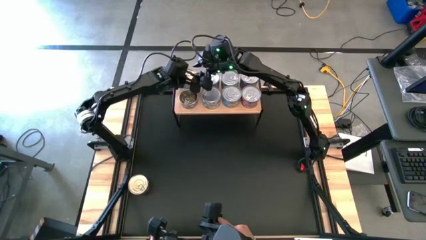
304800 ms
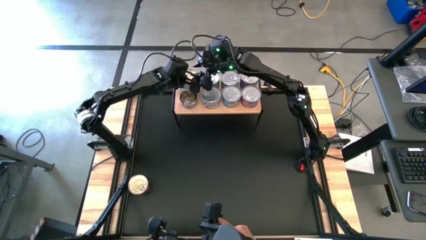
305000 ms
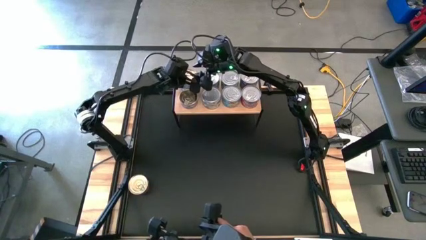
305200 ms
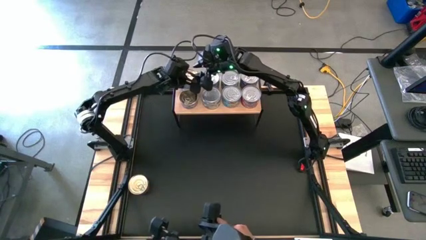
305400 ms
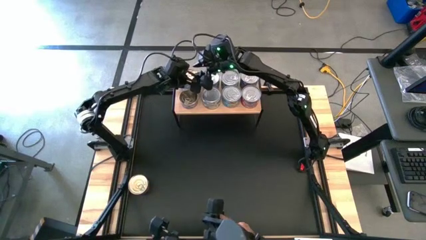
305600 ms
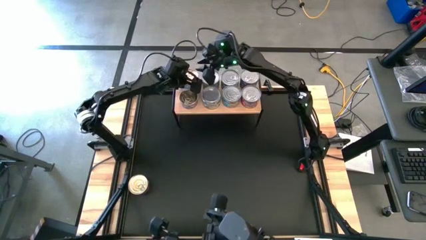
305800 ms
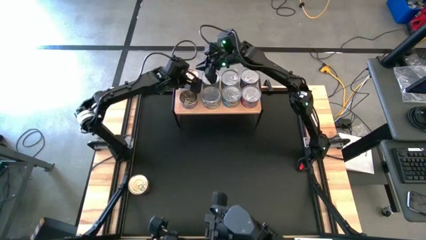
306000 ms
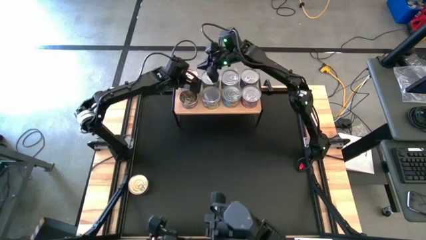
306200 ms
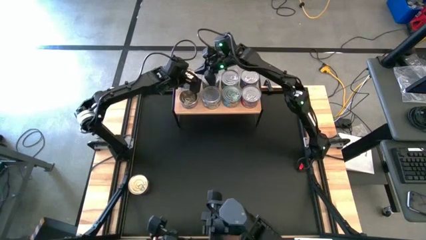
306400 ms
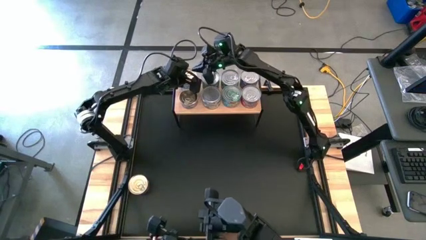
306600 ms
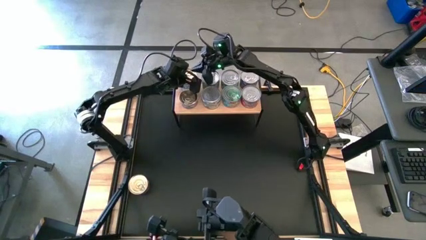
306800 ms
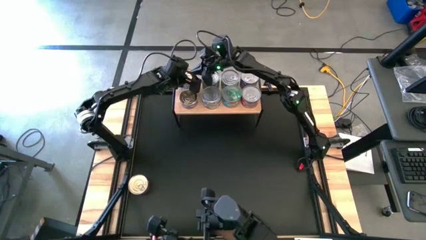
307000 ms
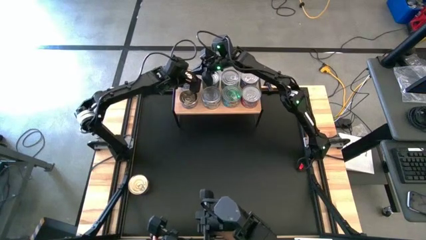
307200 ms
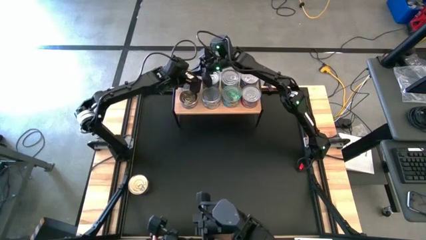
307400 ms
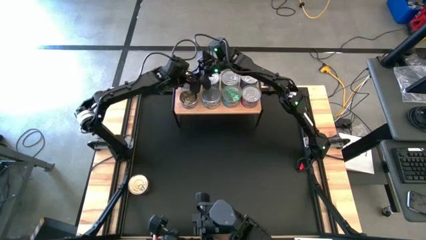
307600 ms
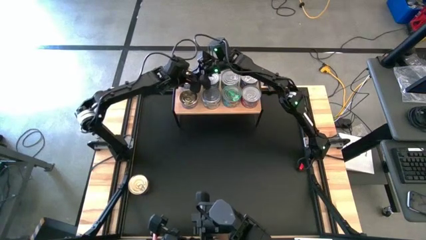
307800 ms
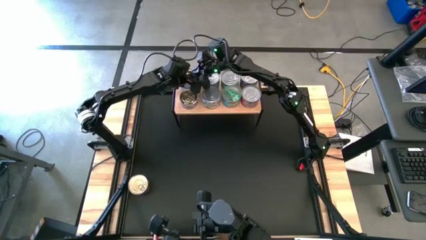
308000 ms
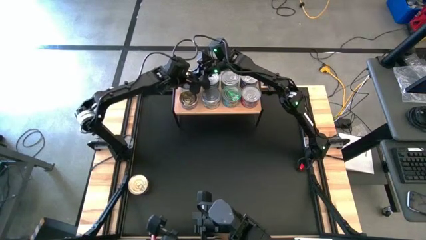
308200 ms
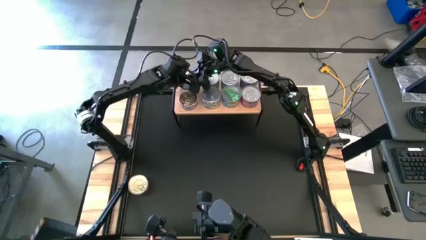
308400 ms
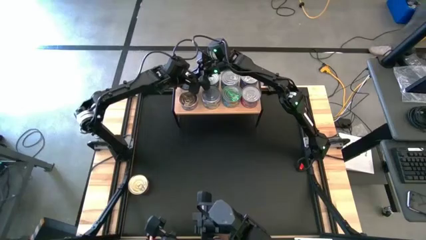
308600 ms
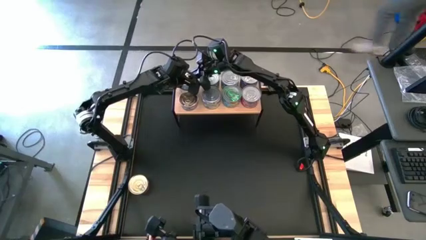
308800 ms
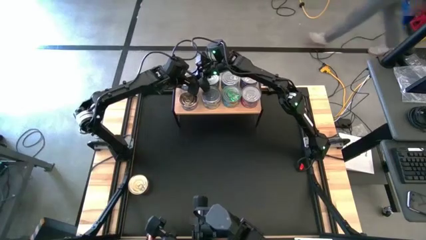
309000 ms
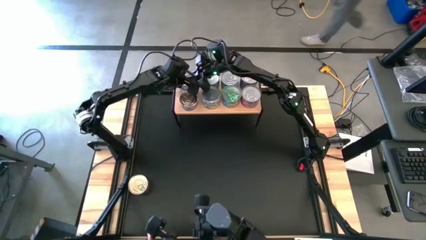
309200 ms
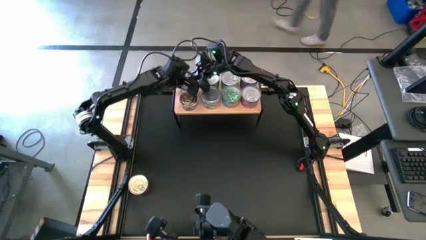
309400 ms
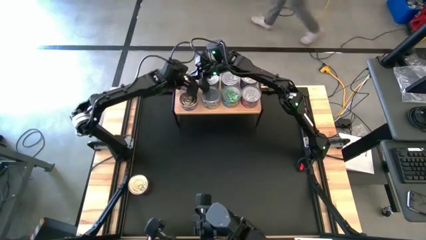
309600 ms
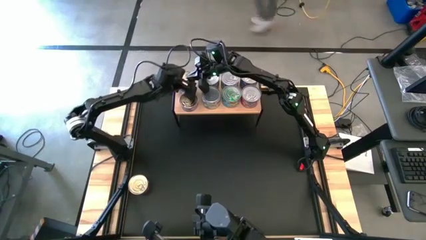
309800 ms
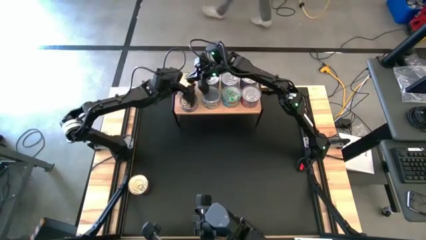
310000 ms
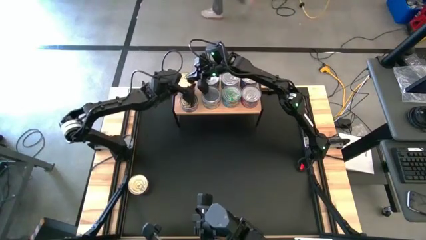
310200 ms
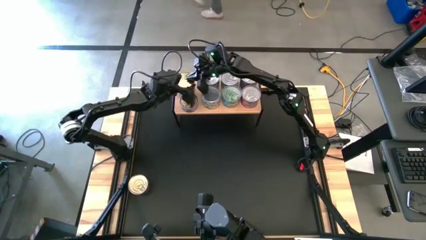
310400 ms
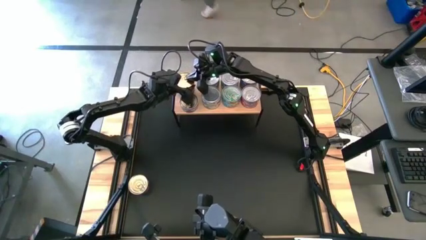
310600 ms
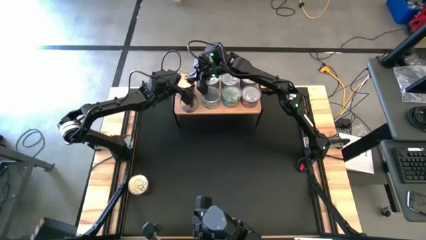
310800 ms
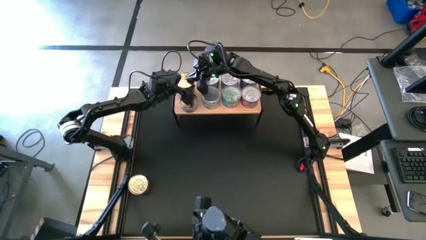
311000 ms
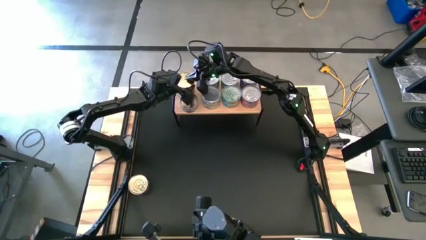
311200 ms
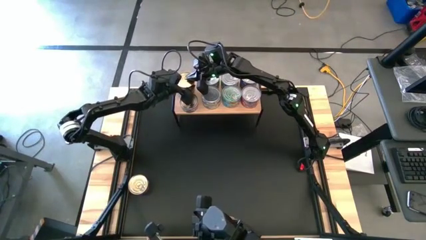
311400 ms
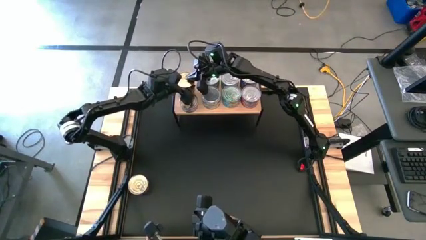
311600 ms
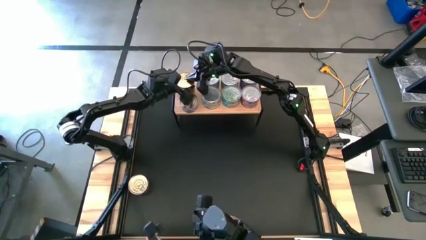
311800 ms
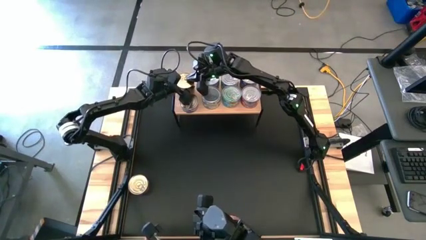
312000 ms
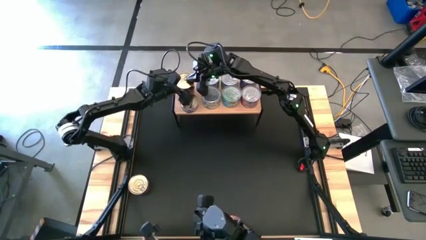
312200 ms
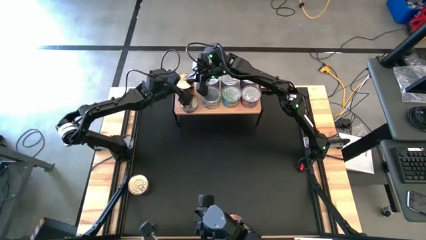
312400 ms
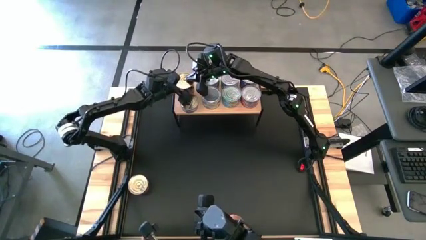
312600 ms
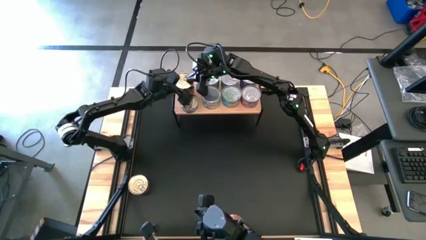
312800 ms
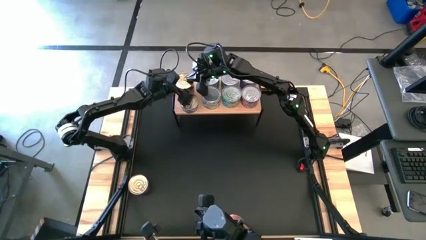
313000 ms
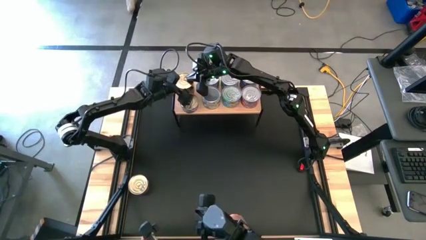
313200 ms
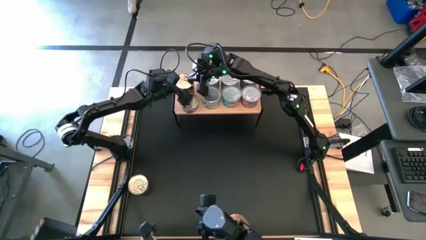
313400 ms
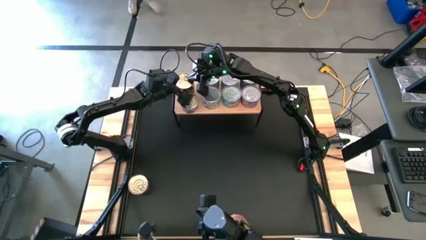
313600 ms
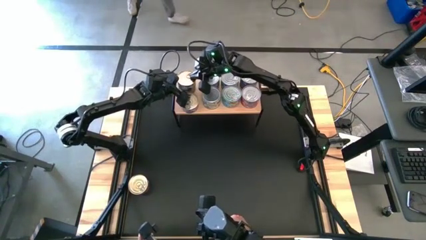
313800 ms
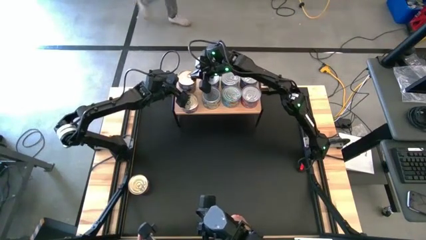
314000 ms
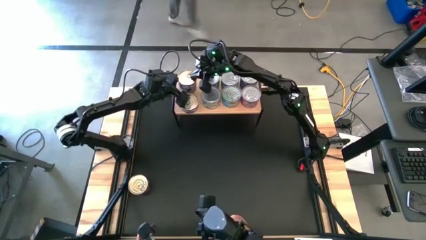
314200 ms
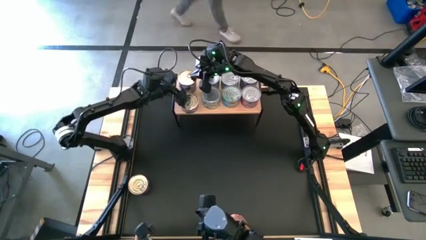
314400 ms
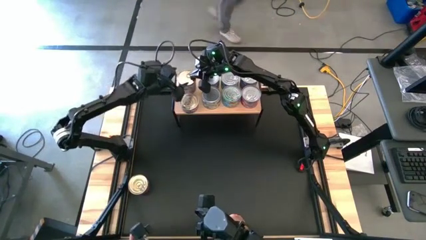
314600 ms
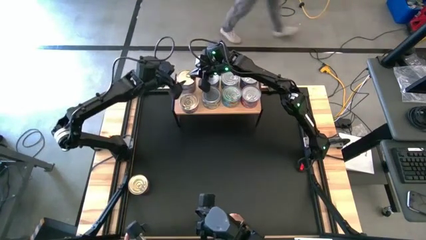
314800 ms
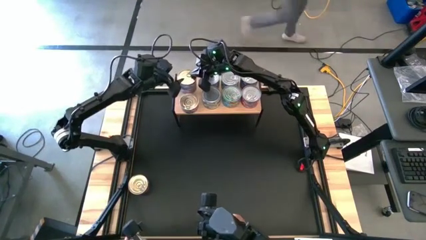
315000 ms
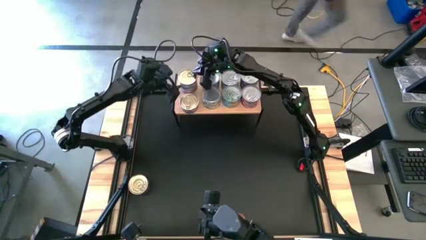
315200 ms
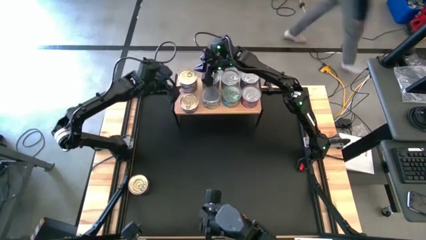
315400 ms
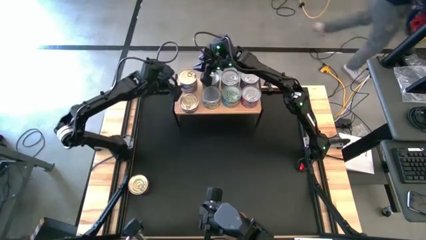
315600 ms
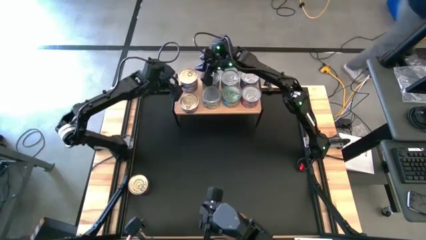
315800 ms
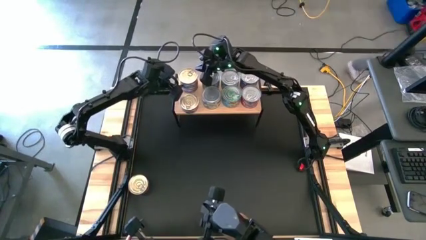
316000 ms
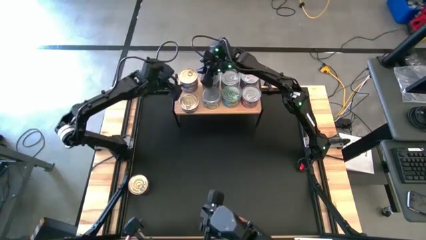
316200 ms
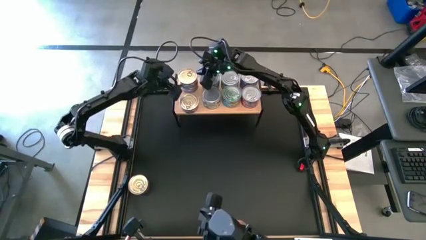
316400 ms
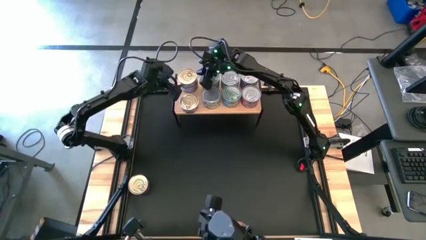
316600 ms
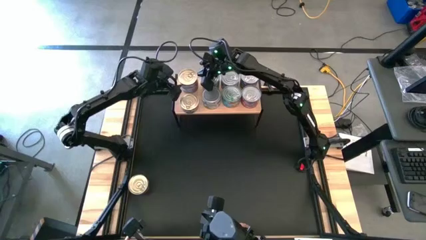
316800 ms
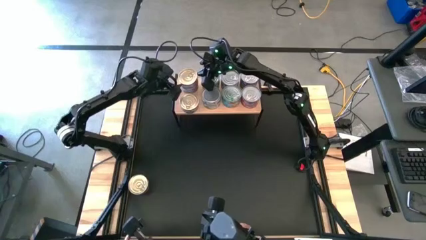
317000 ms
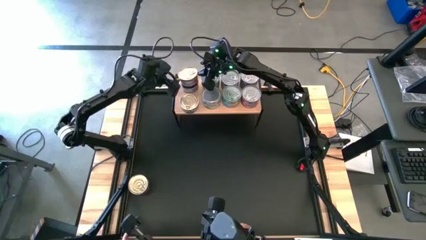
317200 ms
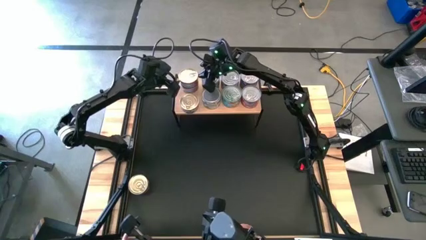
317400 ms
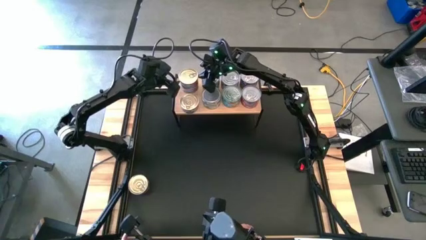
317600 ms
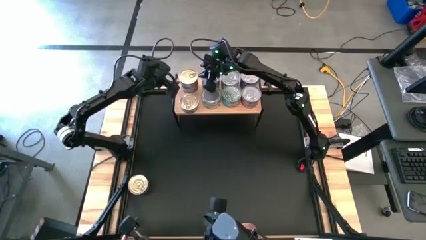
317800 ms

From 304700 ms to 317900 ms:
Task: Stack canned seafood by type on shelf
Stack the blue pink tuna can on top of the other blue pink tuna can on the shelf

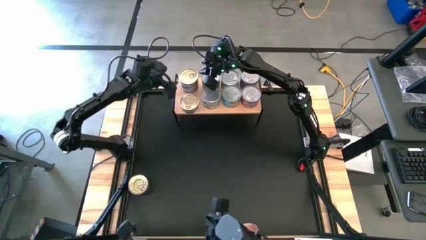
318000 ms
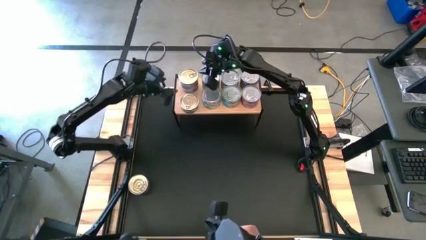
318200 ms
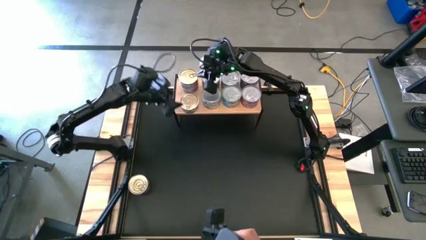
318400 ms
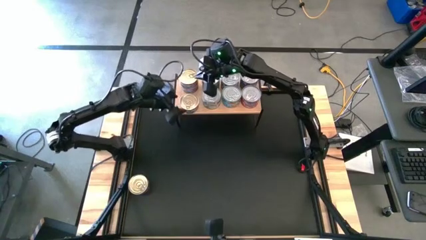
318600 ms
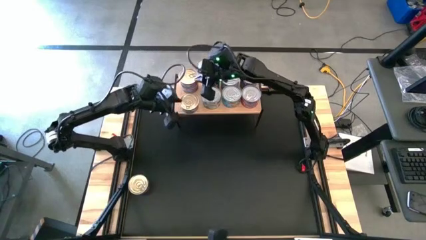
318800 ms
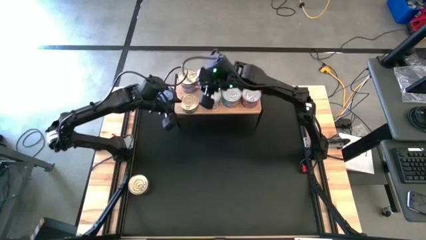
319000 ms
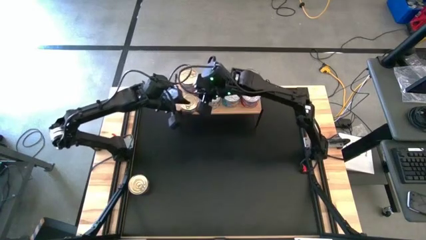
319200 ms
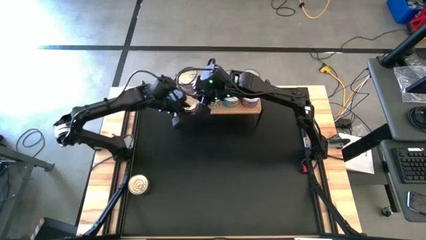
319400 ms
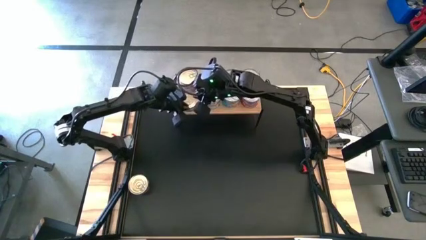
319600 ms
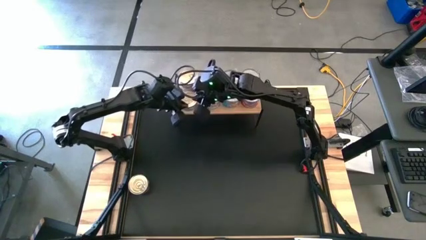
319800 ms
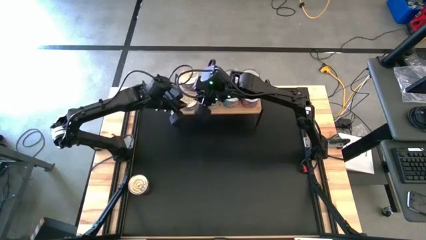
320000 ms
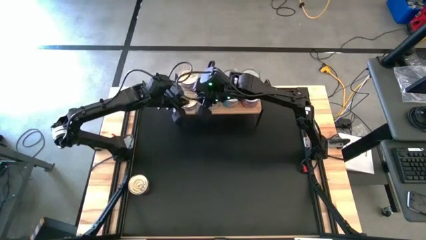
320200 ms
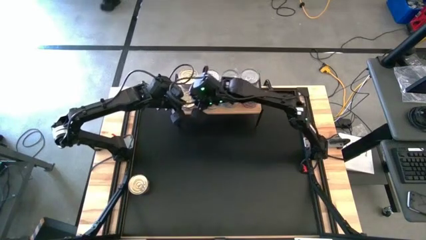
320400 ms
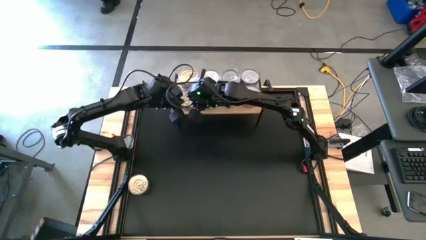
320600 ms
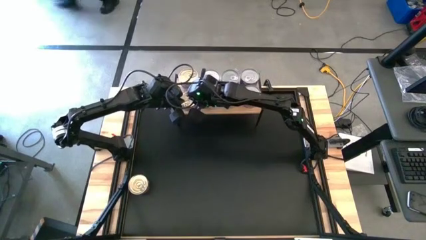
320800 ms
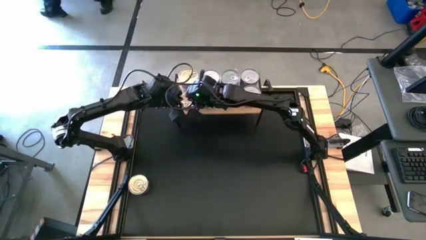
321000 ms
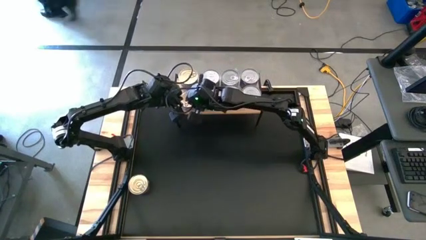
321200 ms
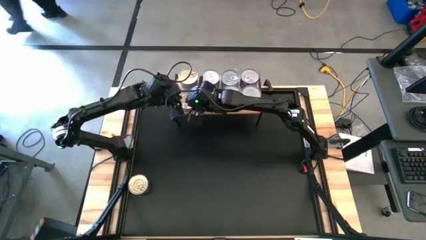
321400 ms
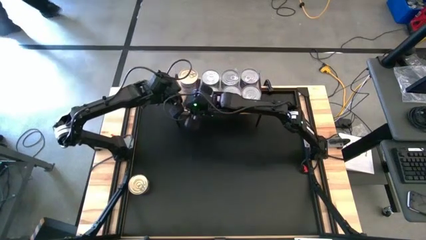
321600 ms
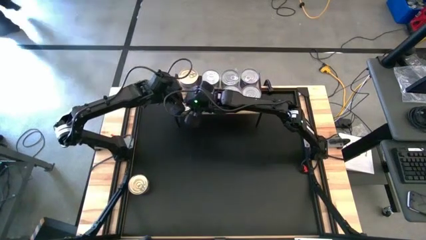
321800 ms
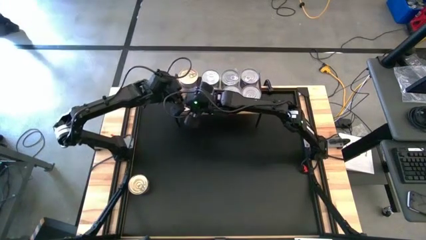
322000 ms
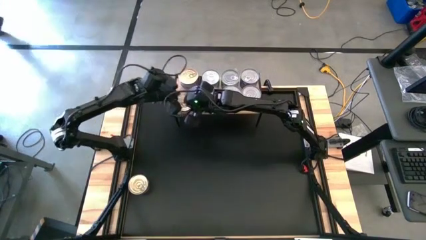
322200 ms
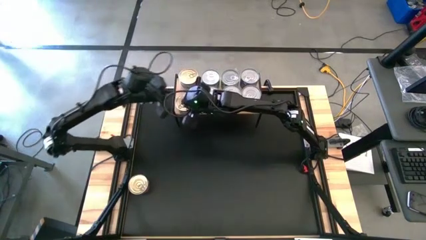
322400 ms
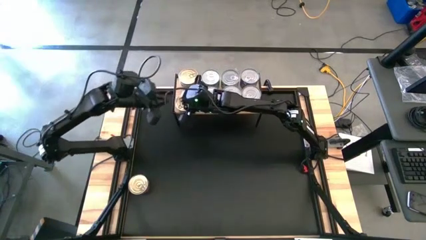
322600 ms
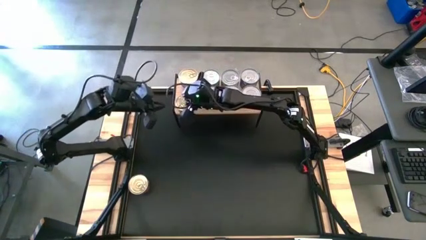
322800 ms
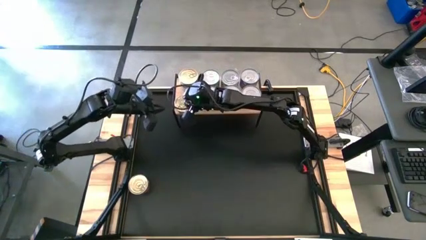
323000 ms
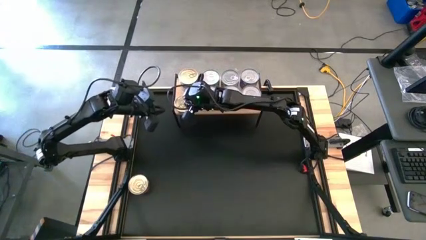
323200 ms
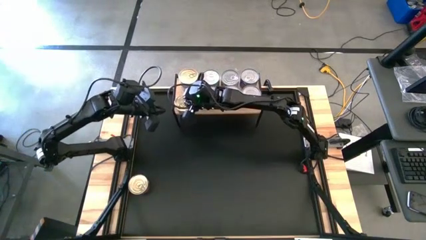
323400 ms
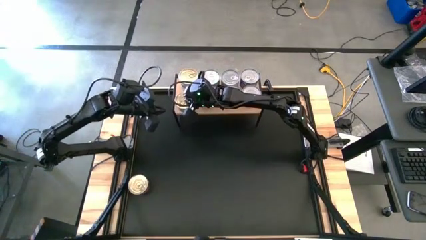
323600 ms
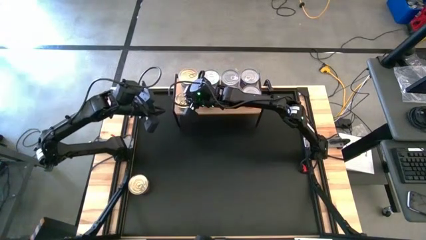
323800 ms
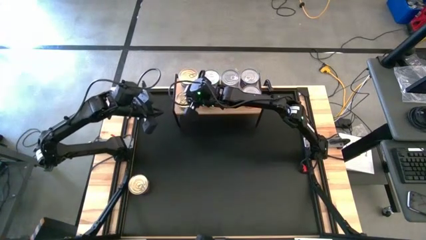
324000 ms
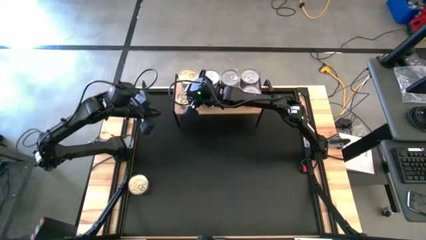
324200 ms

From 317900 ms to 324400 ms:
Adjust the blue pink tuna can
